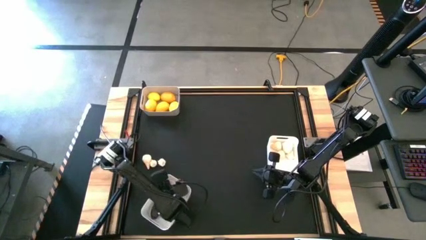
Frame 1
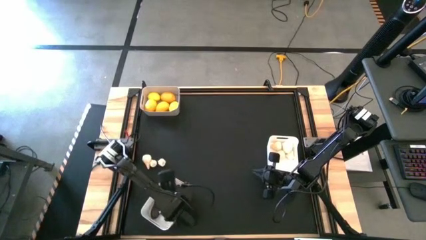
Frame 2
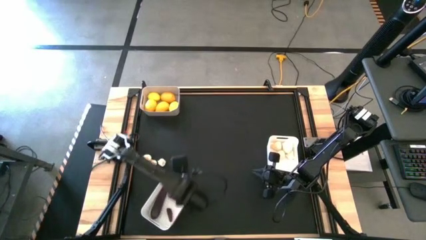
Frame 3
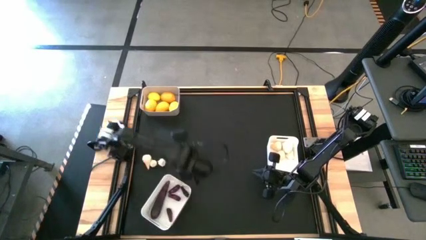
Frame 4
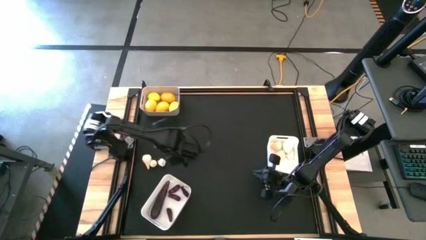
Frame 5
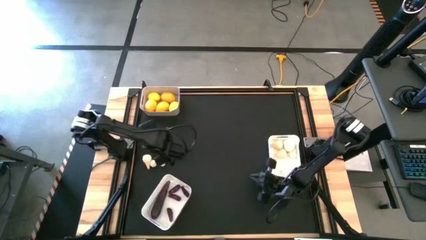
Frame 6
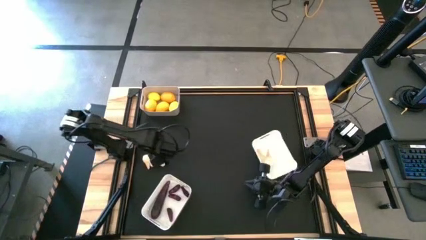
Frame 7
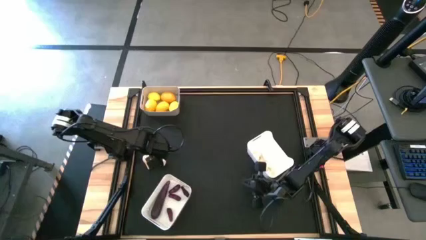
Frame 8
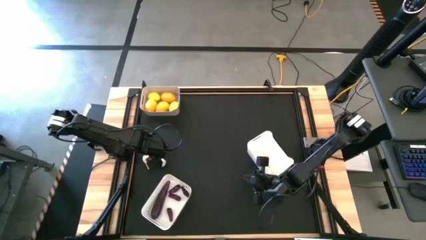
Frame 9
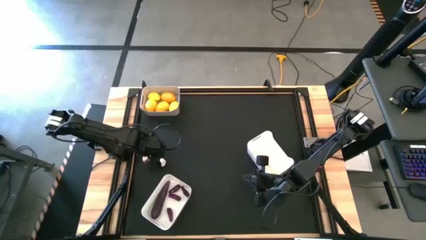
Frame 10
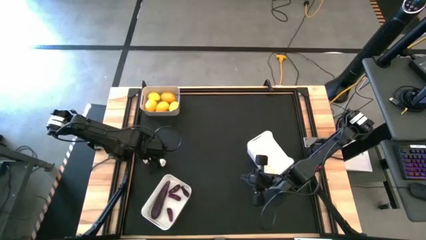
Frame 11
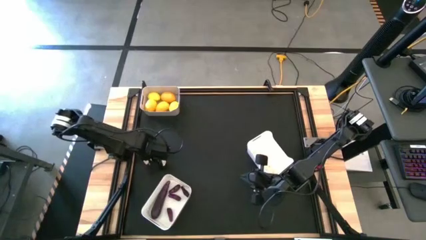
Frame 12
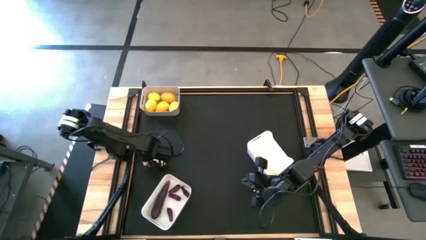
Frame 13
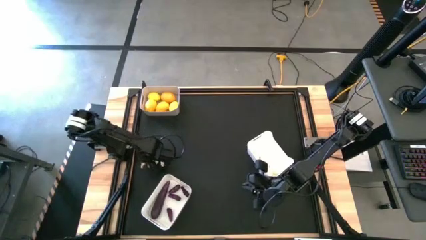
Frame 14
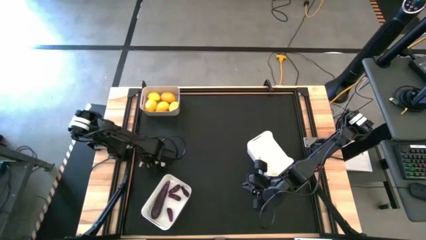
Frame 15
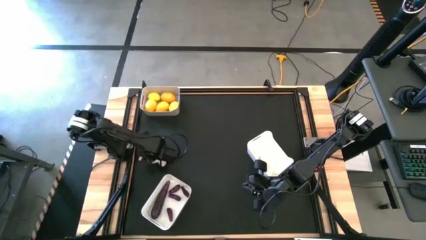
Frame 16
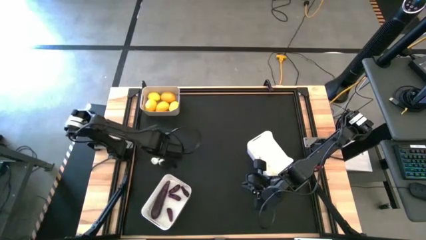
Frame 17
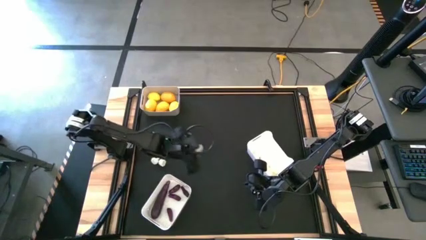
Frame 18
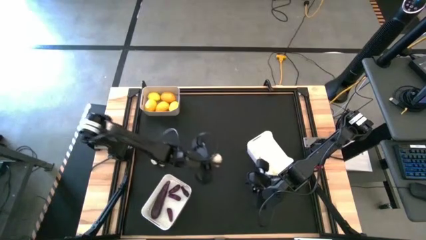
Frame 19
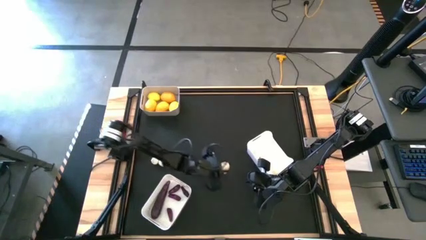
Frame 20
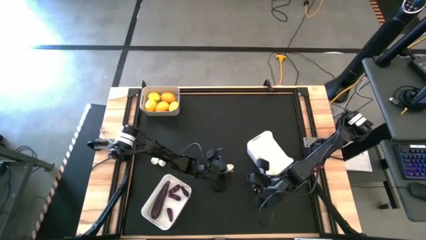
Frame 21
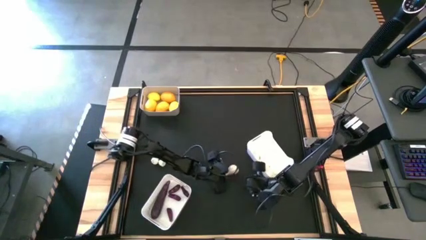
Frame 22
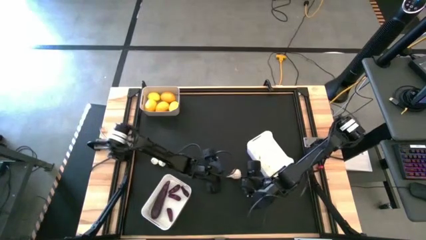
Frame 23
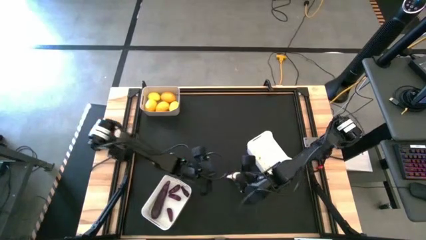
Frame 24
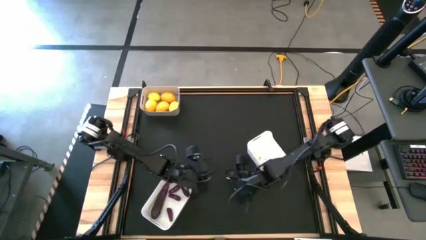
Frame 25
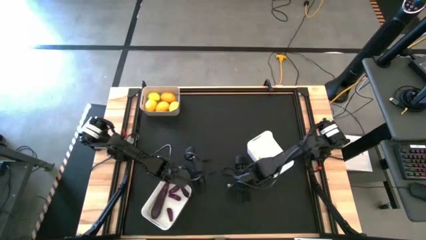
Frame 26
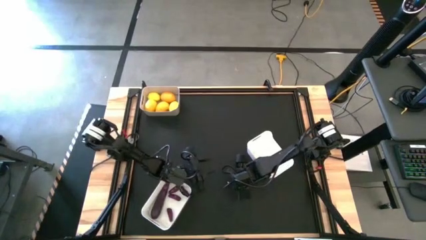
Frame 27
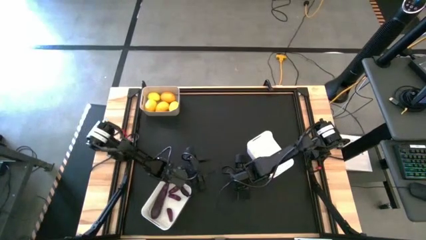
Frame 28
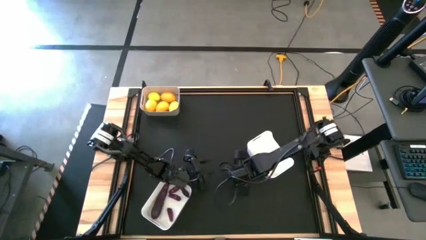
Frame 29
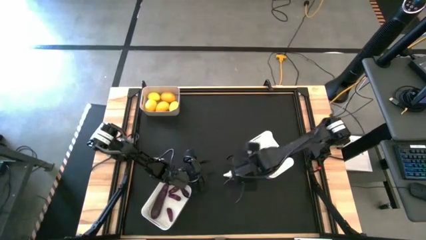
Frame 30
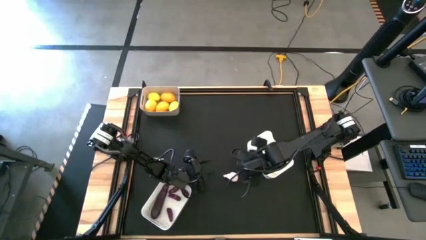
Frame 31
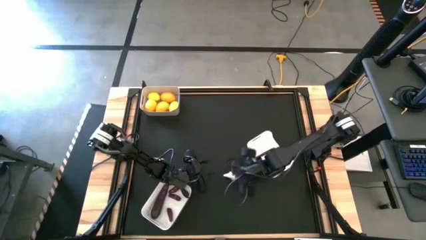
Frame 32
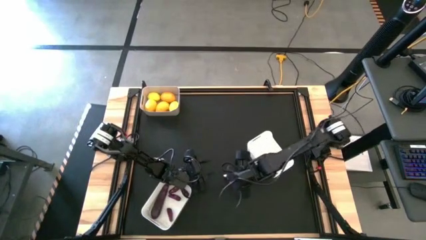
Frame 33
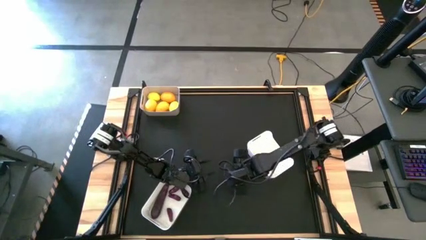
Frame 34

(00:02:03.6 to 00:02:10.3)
Task: Sort produce into baskets
Put the left garlic into the middle right white bin

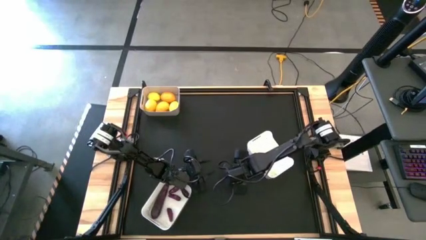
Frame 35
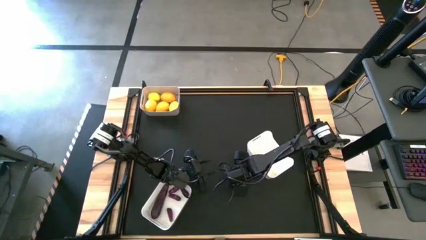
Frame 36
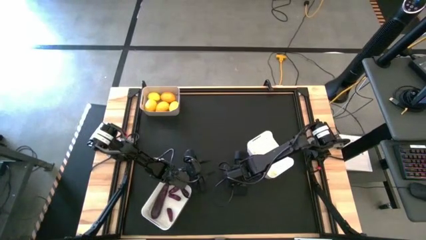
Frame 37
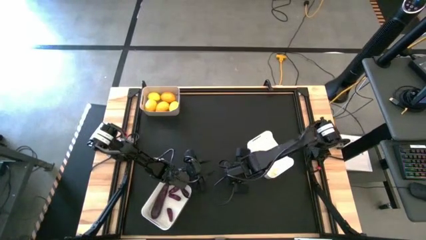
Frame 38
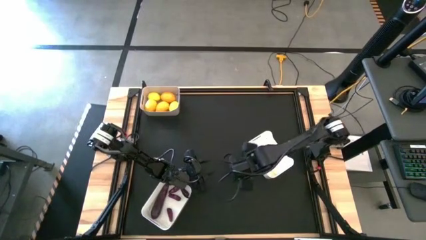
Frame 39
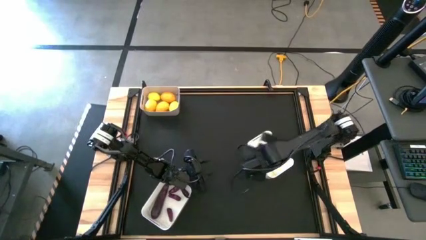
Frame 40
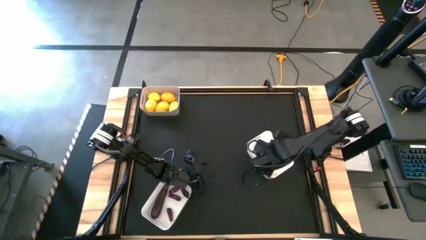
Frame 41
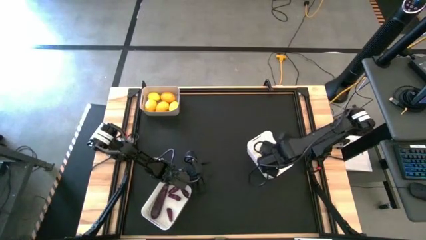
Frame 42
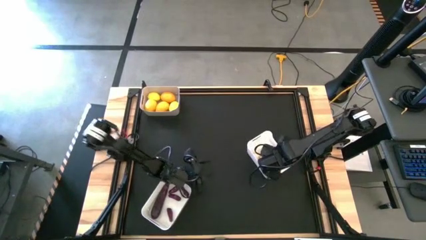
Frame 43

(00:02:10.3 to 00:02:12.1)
Put the left garlic into the middle right white bin

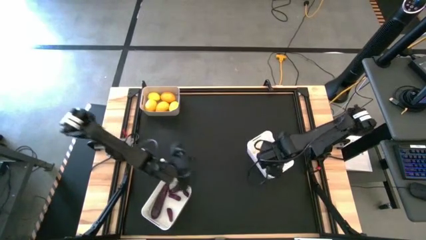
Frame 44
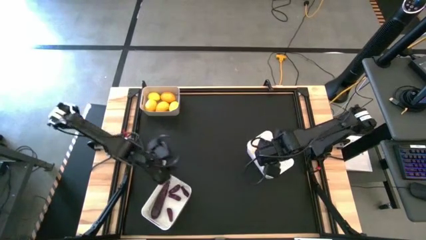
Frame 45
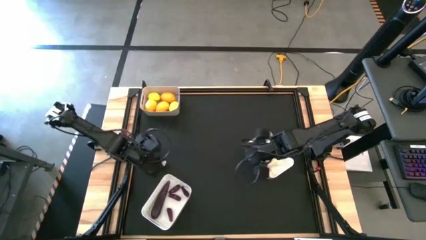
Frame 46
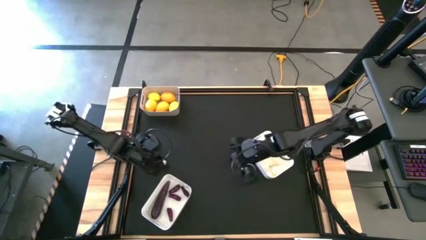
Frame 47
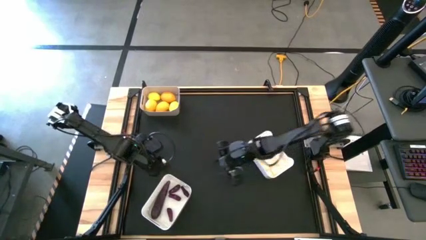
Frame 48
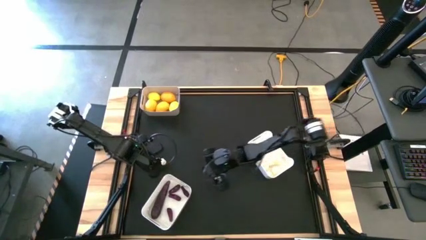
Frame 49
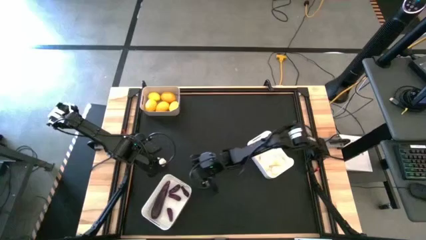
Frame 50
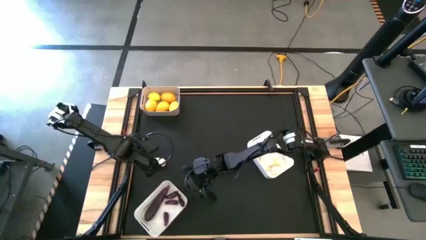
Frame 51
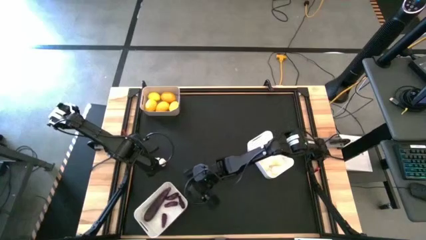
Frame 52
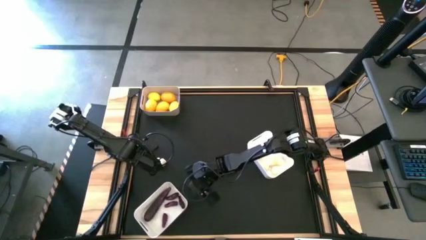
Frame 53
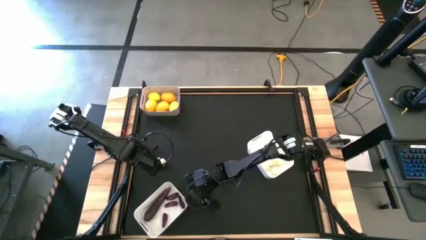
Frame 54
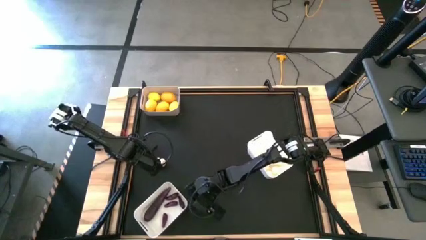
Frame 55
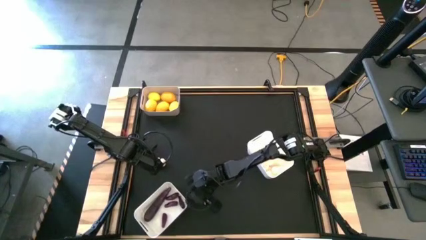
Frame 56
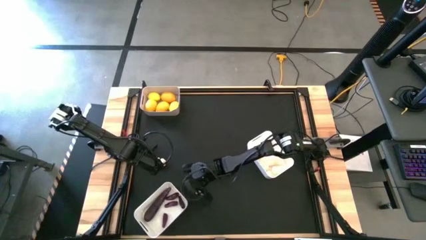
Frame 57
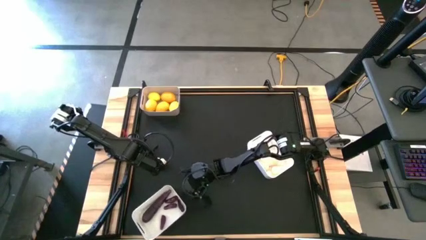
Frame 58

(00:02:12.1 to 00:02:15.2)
Adjust the bottom left white bin

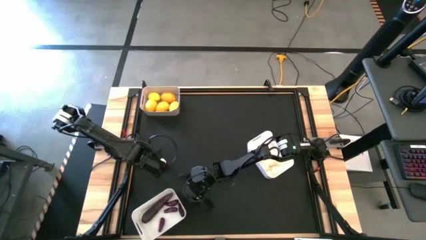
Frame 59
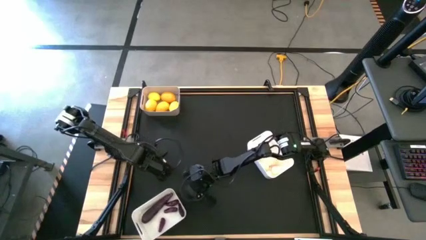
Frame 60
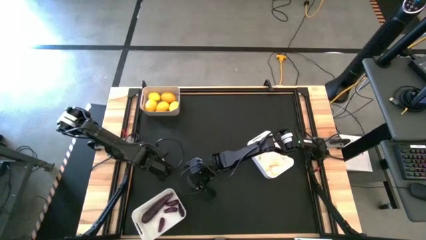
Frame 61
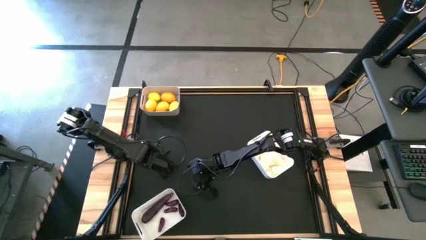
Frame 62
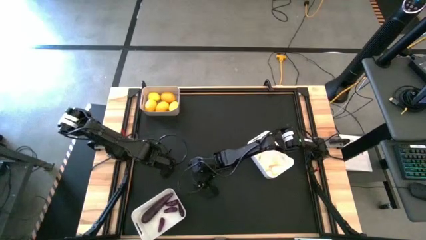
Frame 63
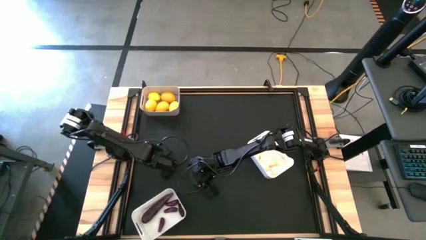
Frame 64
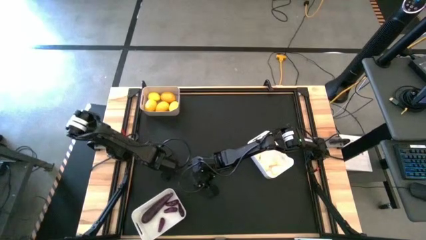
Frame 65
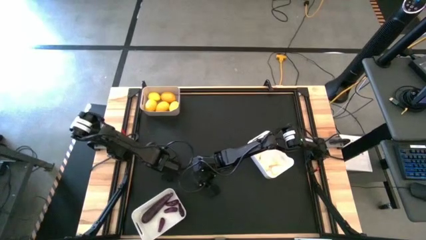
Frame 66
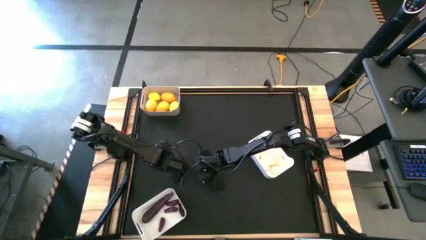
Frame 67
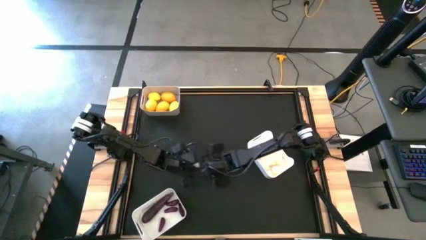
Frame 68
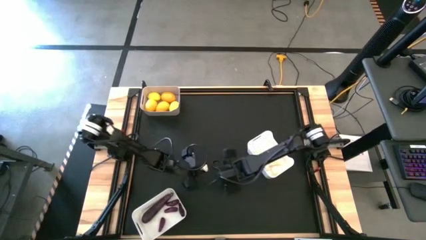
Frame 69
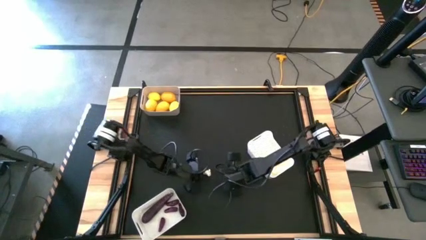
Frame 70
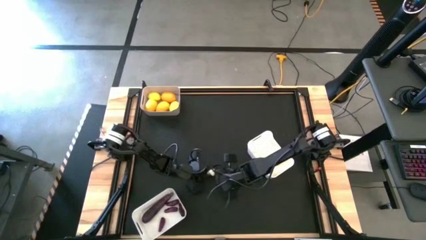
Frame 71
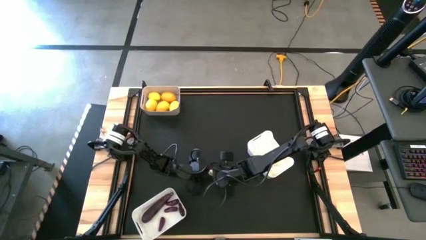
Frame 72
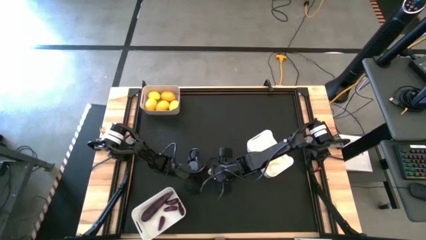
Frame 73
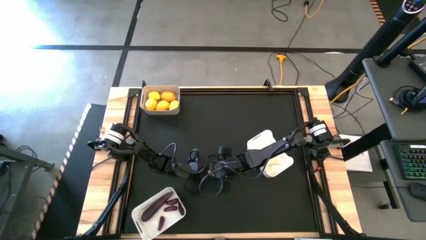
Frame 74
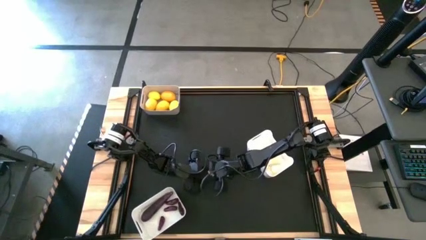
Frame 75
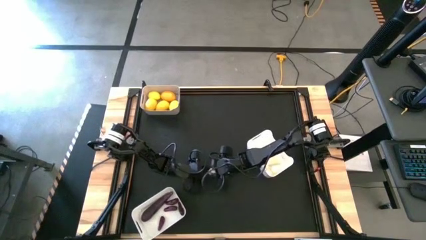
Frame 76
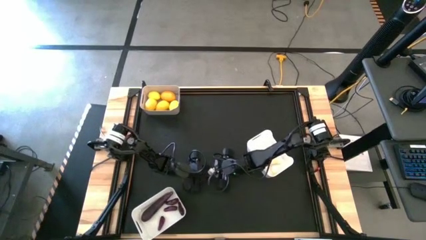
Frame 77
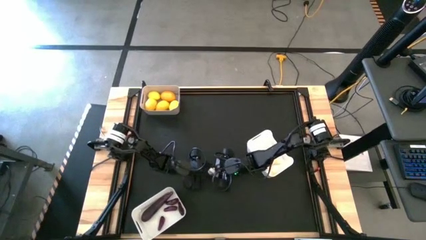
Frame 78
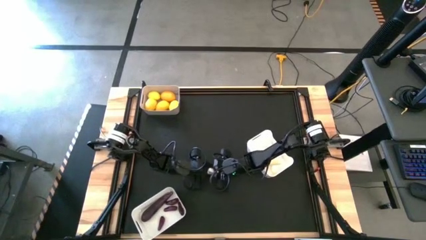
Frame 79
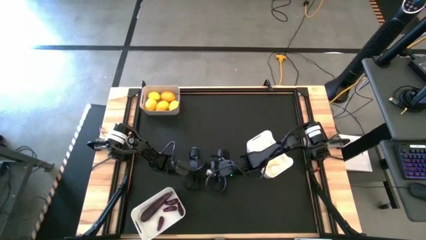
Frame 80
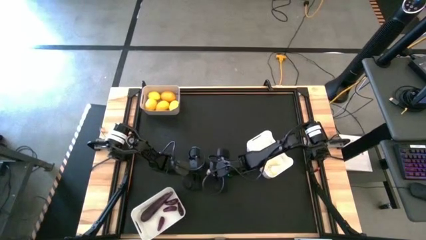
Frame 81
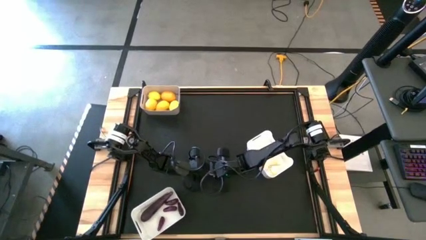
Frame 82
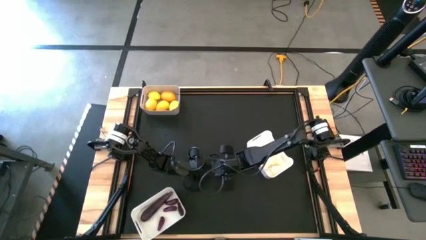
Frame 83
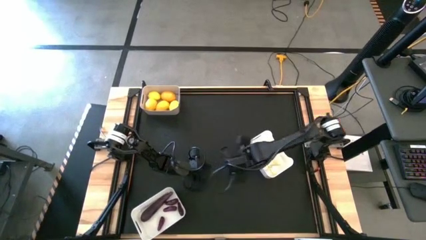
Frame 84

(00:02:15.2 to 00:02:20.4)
Put the right garlic into the middle right white bin
